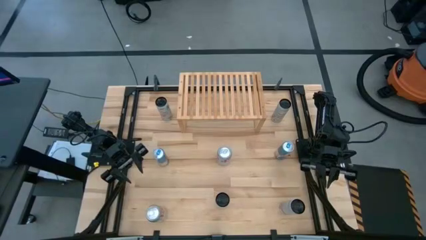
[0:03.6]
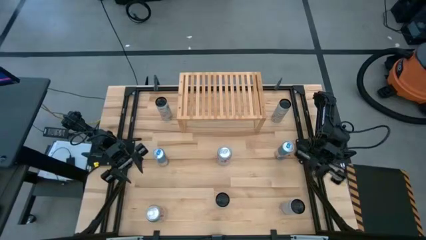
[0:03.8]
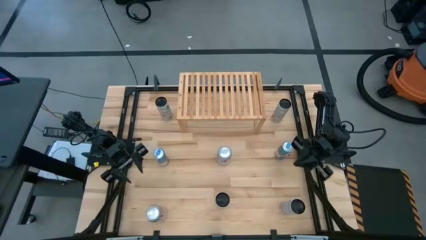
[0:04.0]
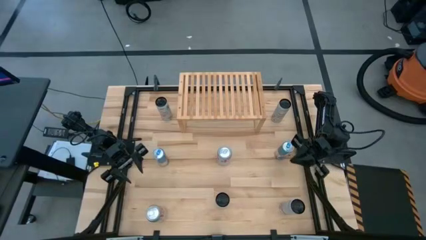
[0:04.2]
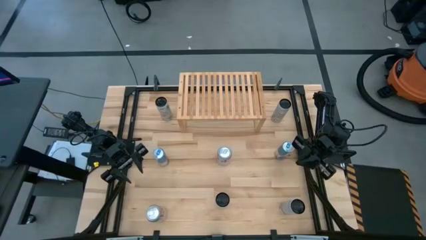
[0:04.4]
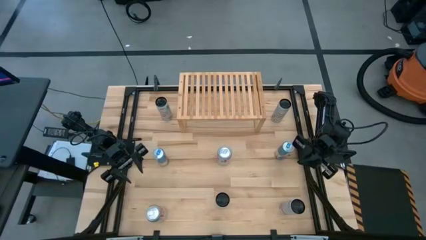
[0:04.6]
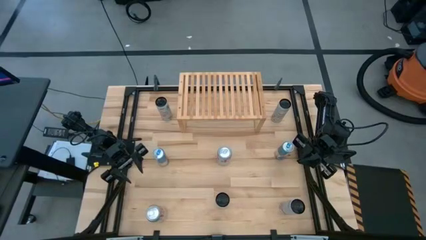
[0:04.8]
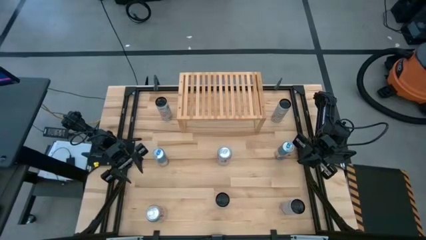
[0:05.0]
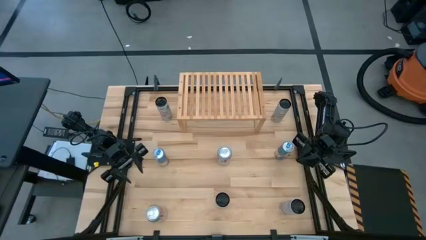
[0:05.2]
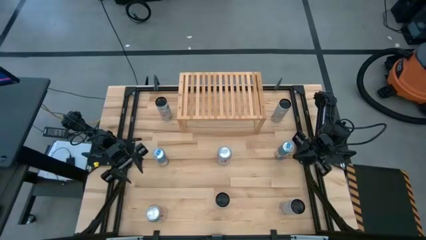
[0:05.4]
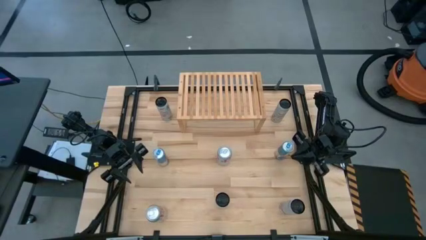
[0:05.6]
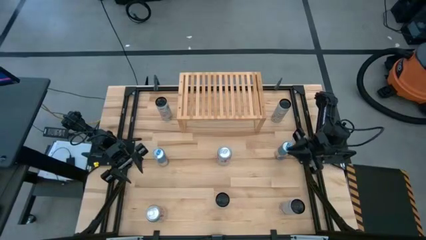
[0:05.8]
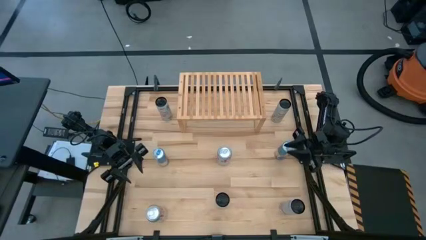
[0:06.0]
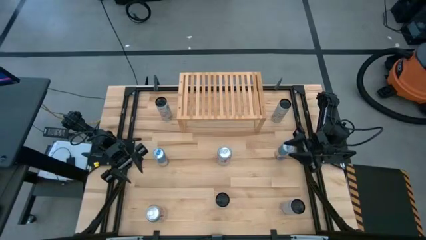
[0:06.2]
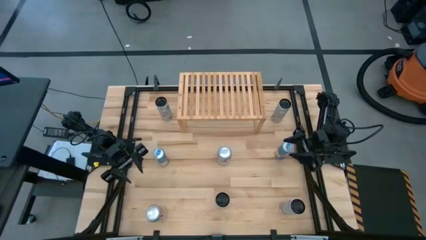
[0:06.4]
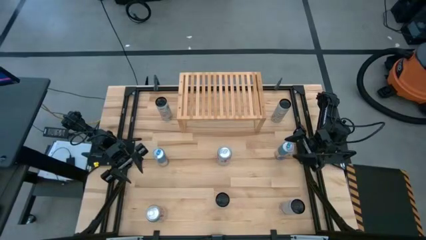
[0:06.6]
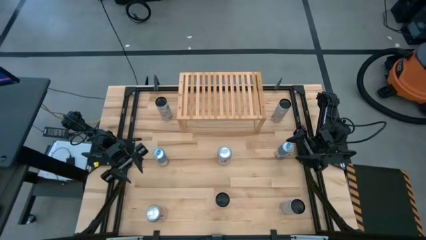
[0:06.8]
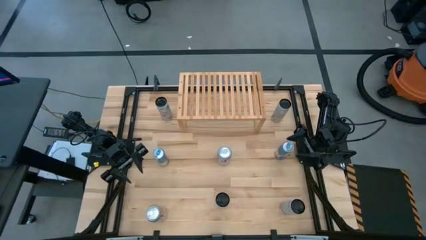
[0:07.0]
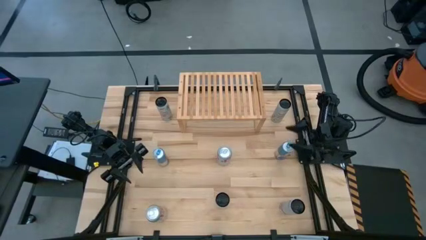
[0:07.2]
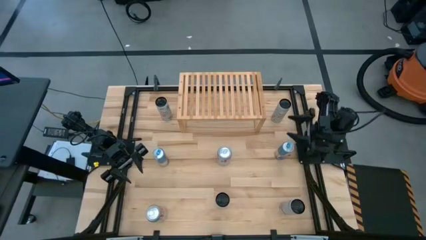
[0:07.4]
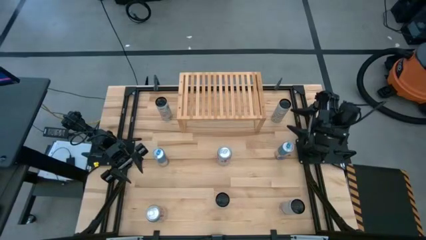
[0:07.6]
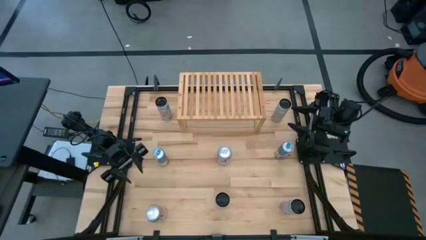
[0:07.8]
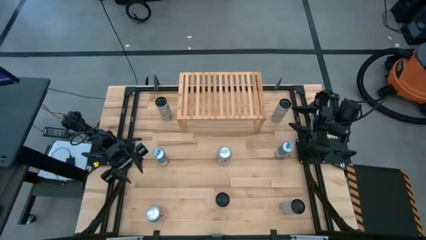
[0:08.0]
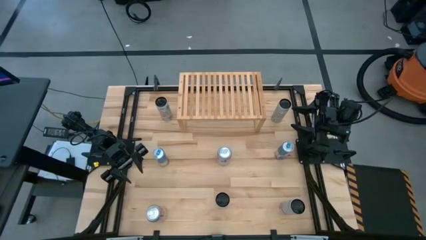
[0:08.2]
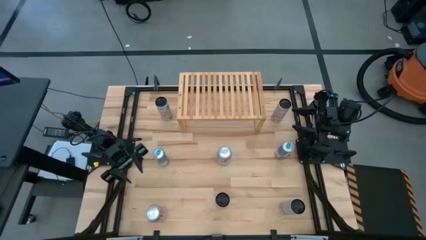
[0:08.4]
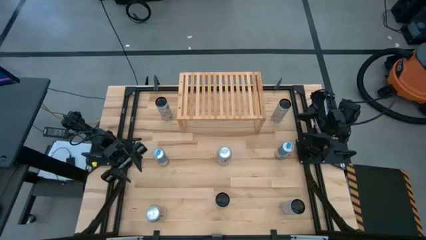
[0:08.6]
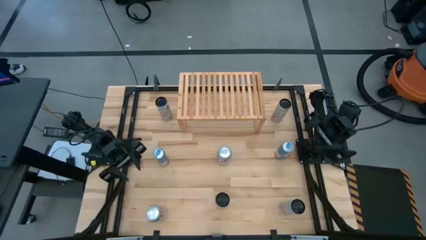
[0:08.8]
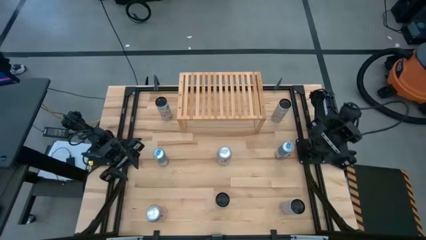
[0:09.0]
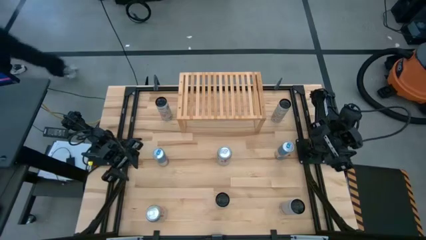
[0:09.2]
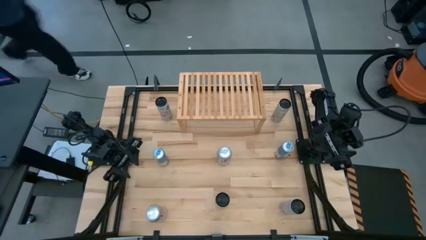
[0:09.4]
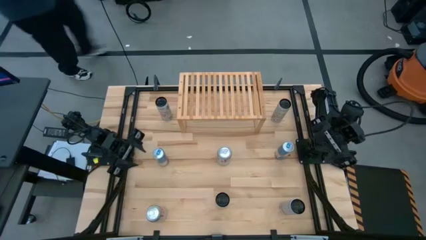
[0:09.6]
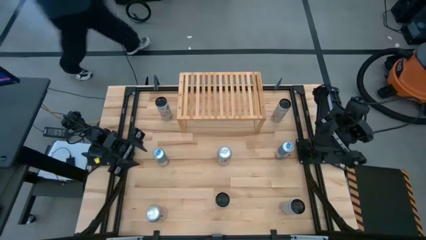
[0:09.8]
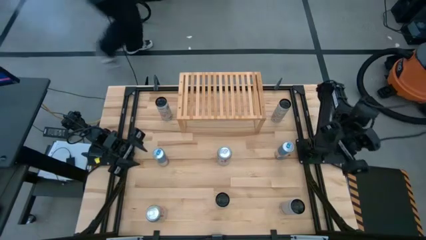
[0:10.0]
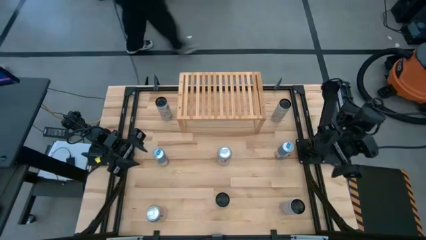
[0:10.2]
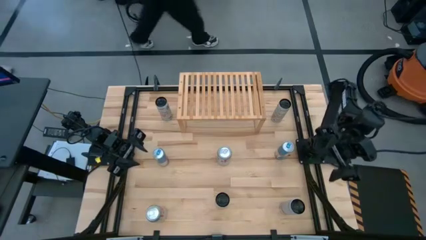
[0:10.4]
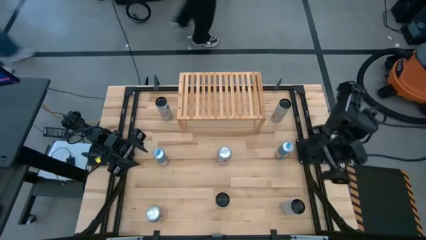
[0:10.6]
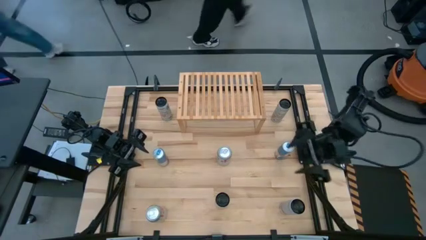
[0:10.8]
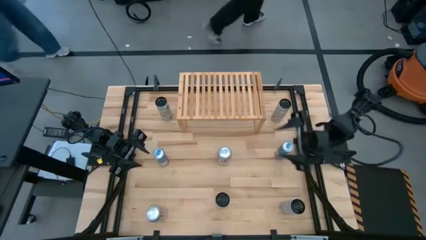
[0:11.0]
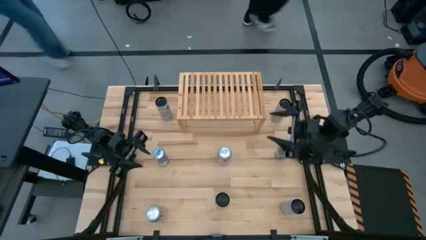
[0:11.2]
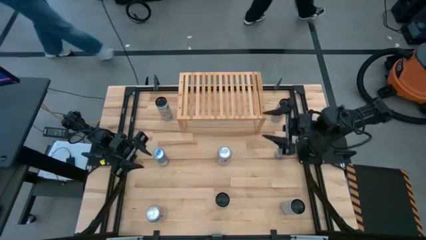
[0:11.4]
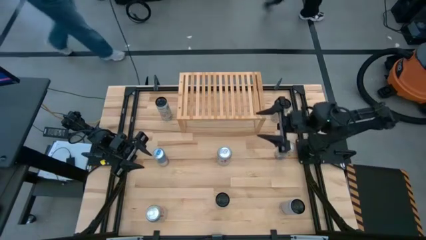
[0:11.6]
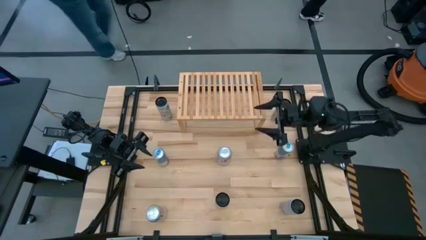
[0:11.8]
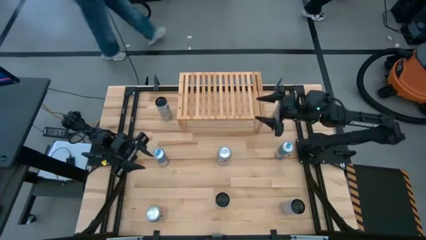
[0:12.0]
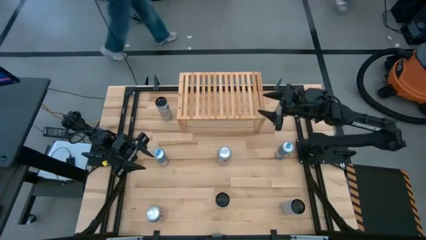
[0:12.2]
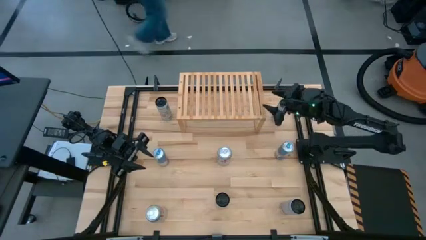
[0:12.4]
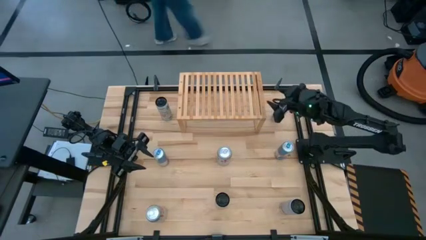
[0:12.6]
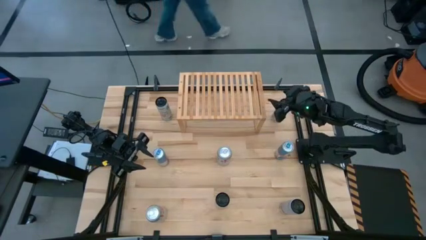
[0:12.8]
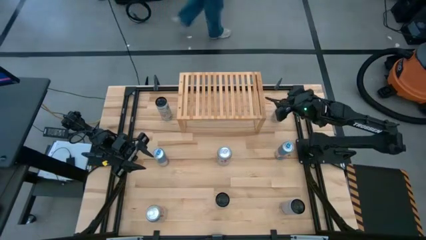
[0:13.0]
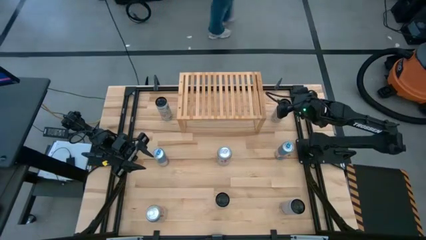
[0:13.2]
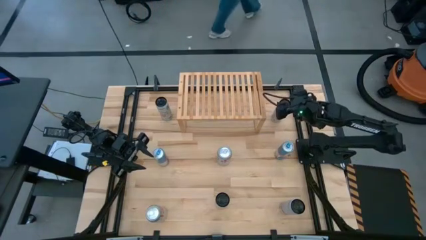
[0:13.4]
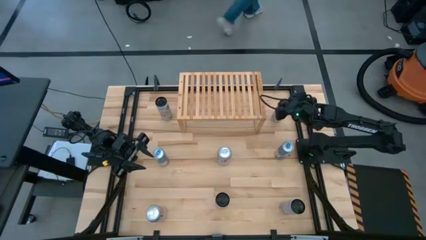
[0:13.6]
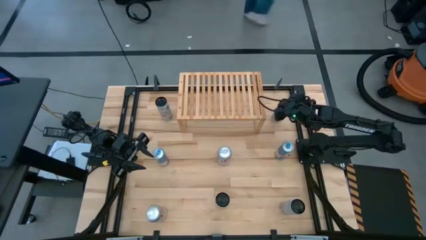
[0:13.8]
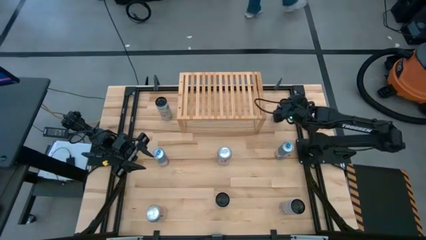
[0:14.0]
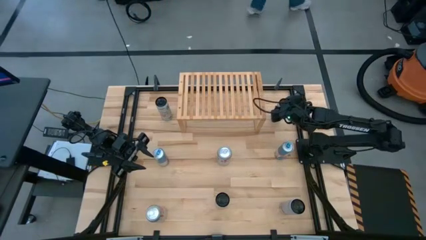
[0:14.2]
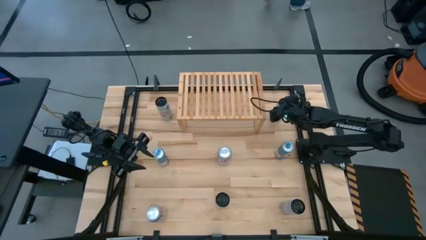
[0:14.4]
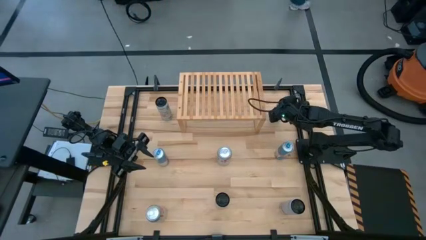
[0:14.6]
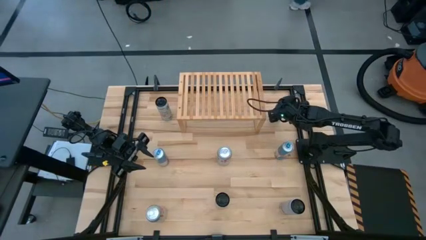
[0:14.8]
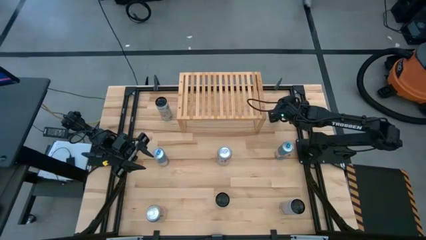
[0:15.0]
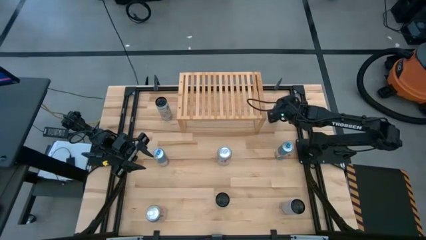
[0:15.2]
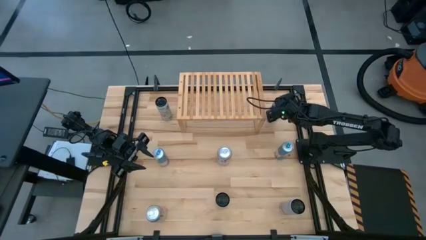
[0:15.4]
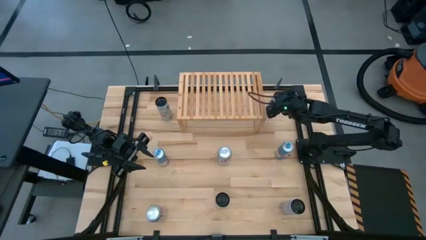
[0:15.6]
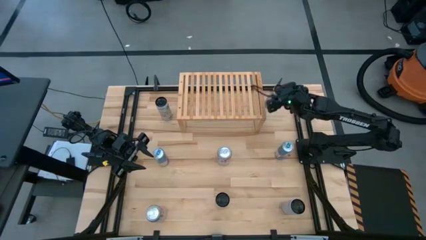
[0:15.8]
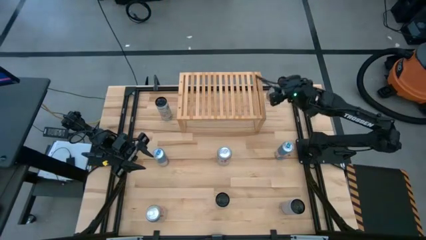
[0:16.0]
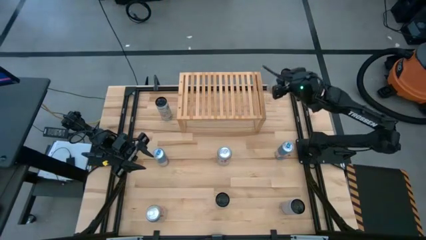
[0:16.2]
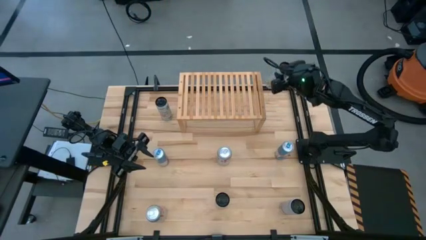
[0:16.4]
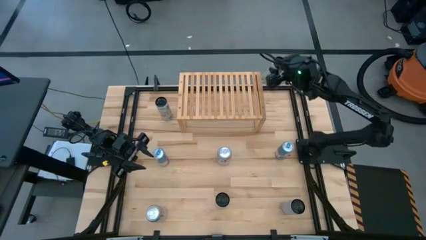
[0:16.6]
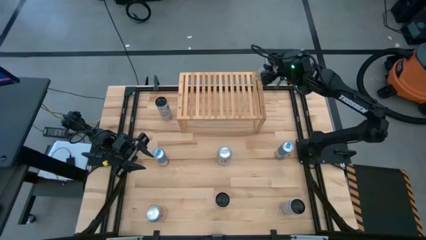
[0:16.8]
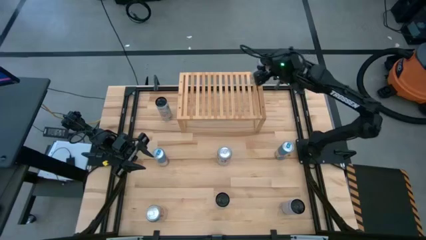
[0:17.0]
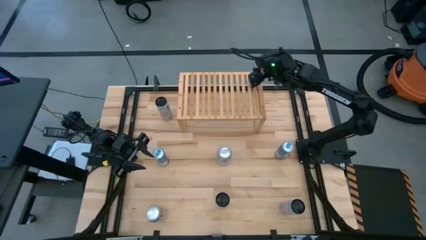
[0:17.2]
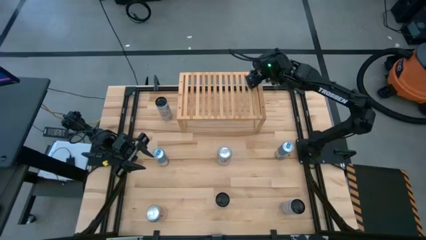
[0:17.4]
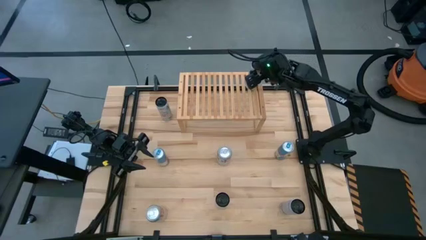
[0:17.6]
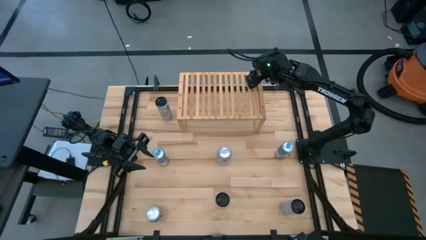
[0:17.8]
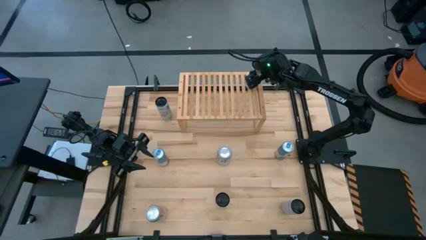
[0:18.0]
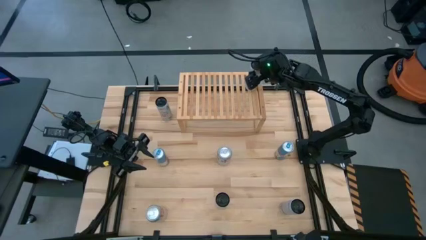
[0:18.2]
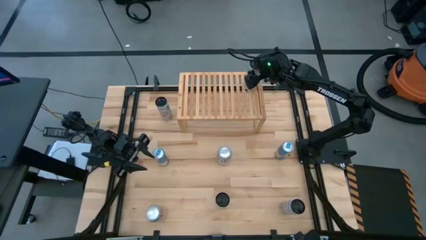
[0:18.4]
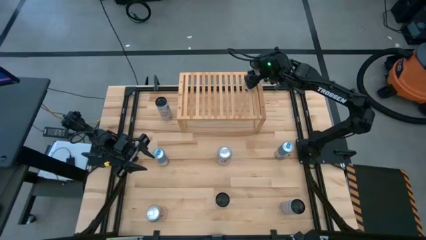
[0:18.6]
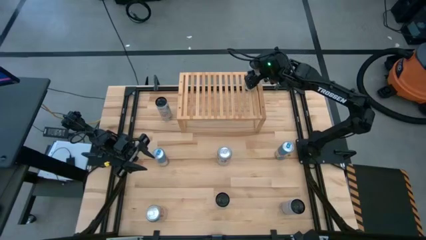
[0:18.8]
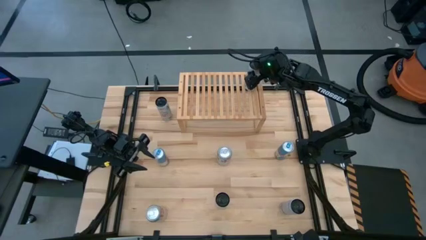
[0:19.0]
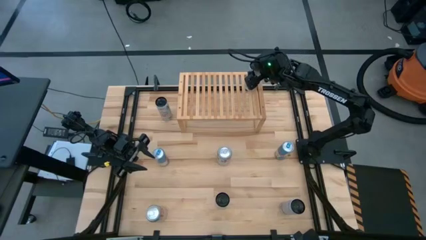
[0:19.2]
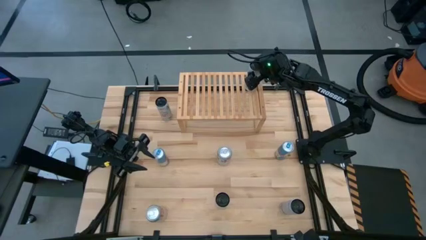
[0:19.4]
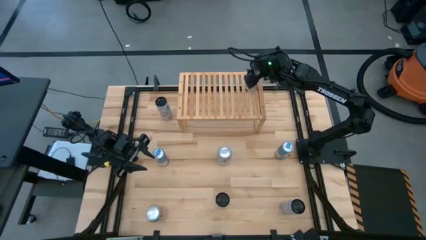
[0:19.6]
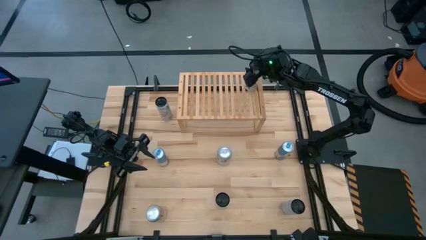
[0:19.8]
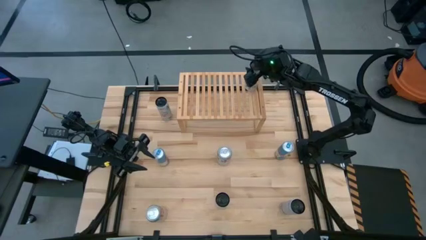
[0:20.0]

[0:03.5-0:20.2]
Task: Place canned beverage on shelf
Put the top white yellow soda can on the shelf
